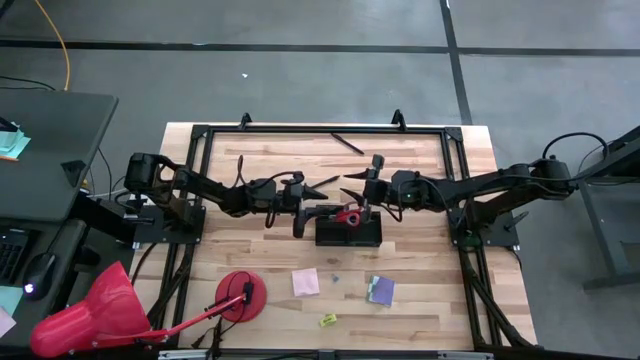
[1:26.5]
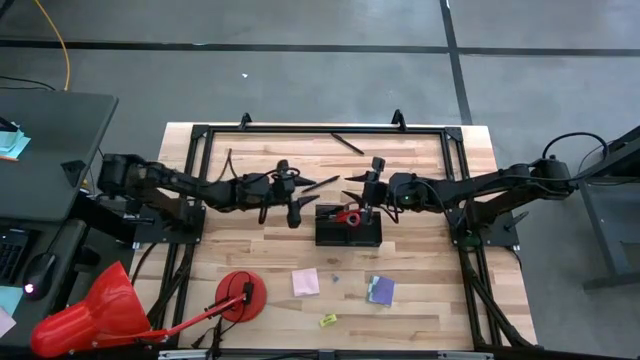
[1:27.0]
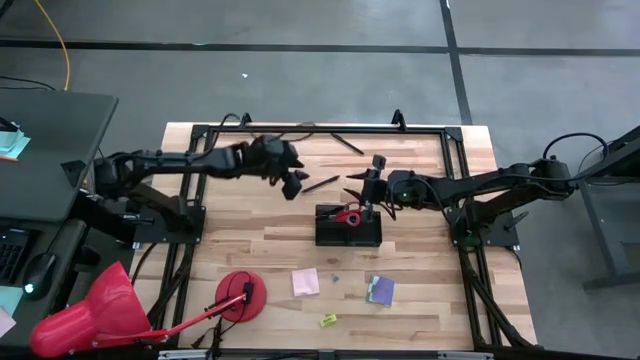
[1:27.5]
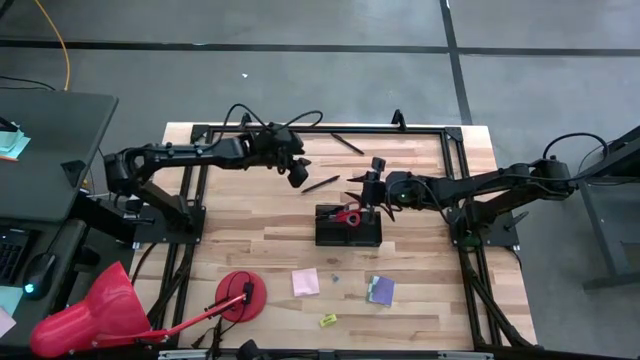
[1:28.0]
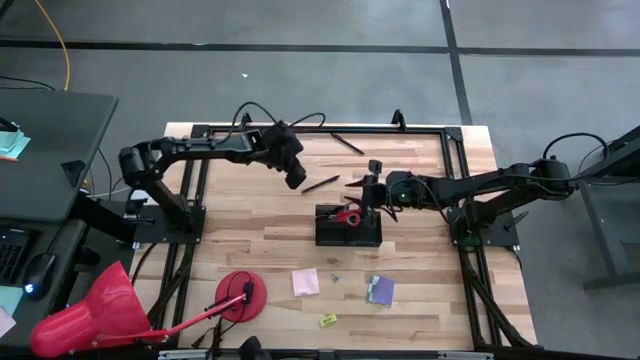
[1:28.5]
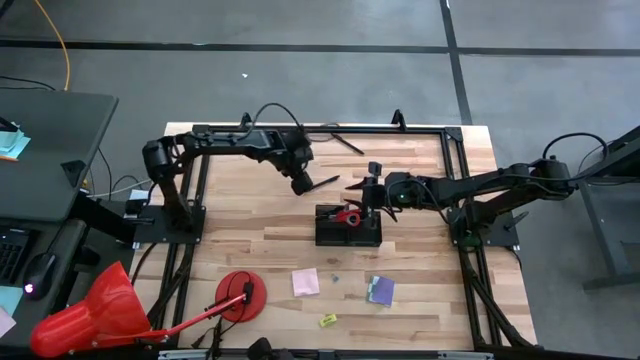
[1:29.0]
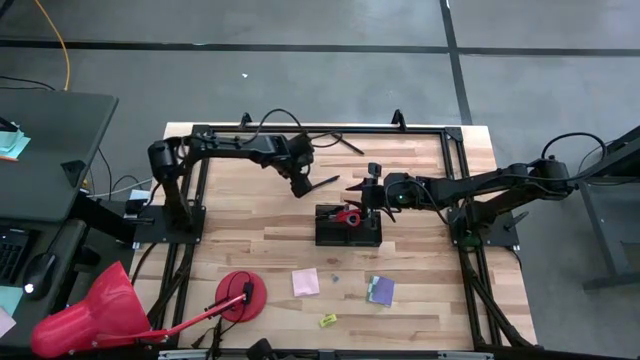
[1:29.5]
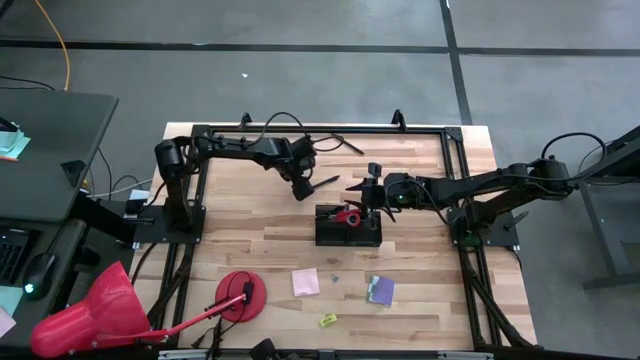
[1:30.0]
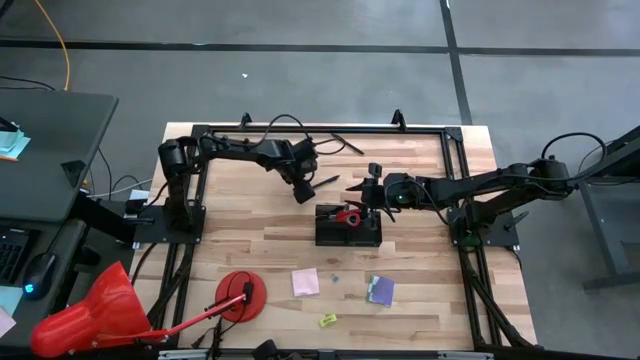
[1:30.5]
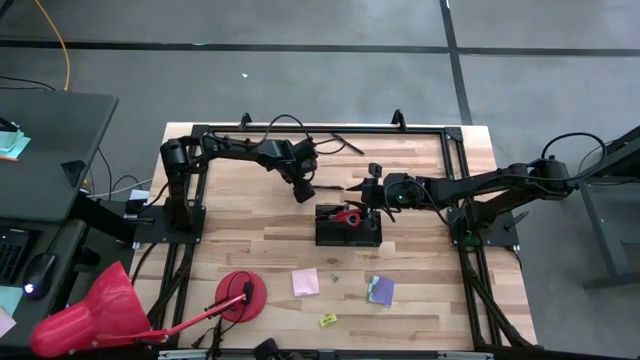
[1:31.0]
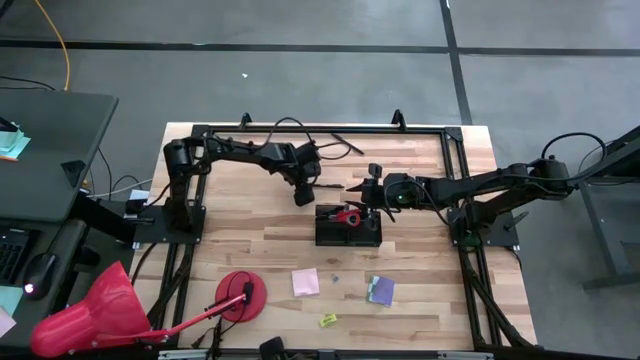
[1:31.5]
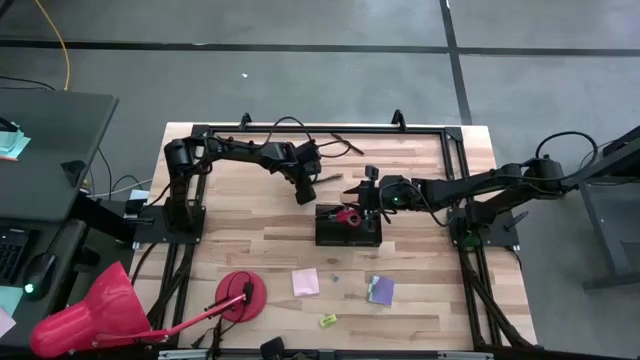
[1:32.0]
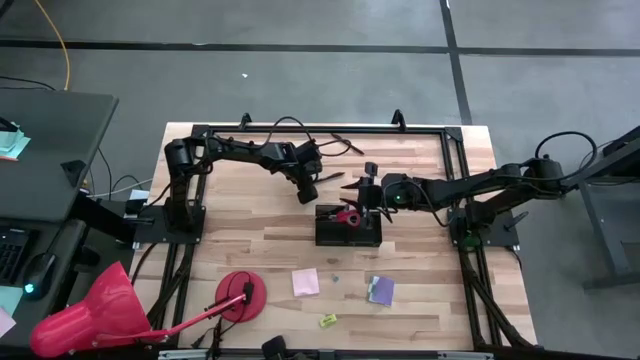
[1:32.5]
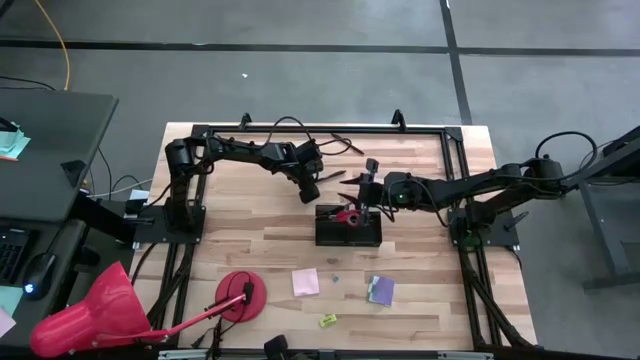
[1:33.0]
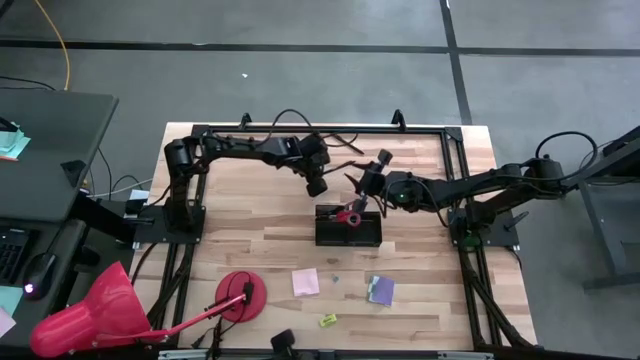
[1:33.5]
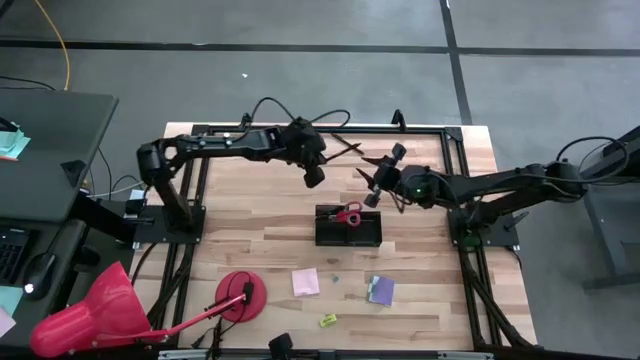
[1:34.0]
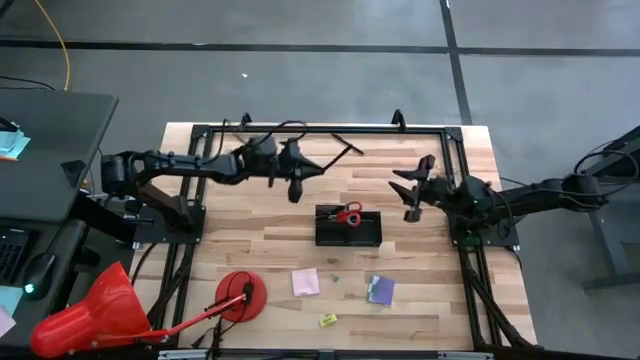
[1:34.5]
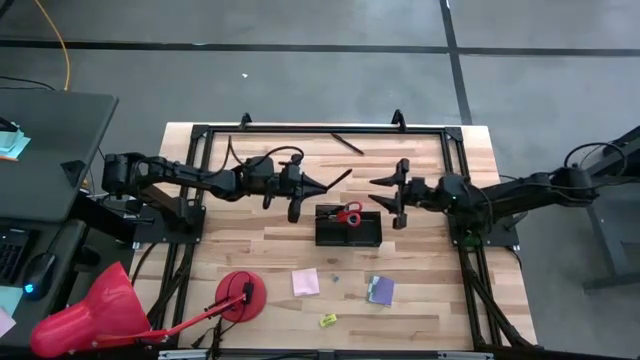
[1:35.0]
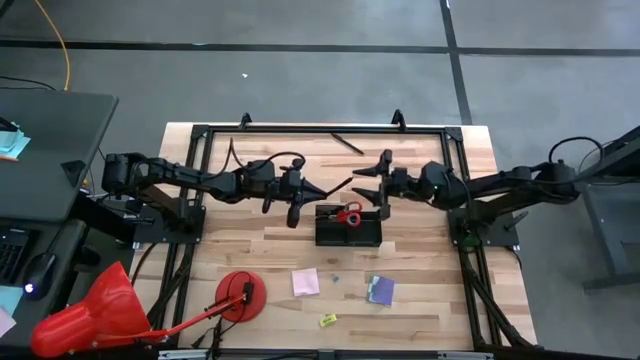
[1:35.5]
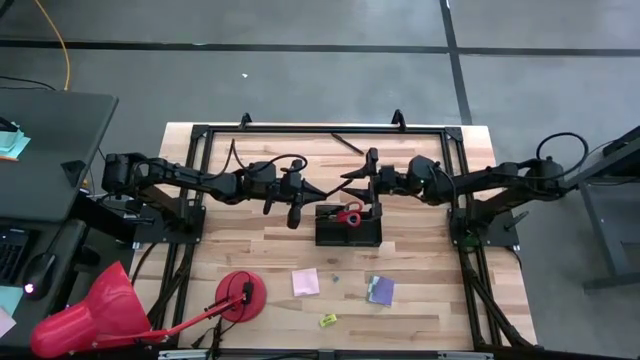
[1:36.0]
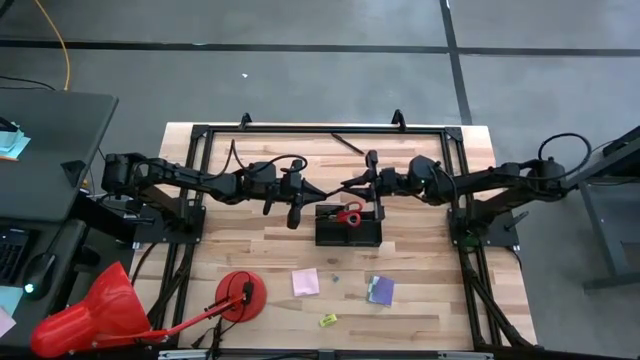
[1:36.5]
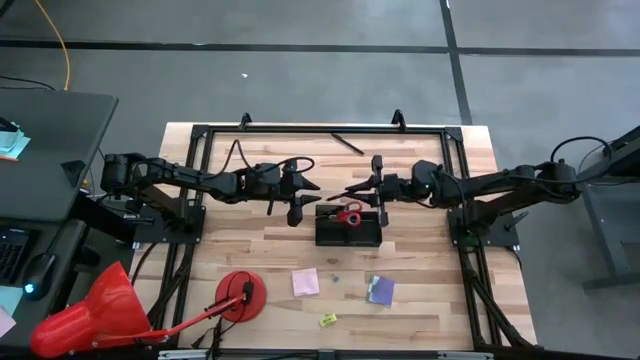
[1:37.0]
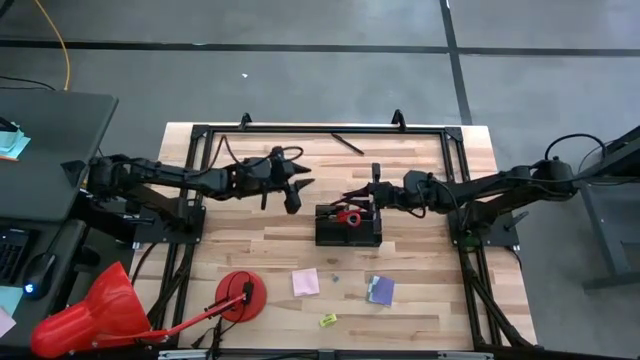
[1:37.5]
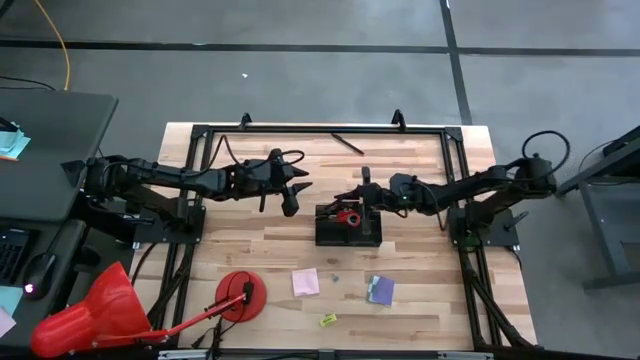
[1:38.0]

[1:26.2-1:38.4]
Task: Pick and place office supplies into organizer
Put the black pen into the black desk organizer

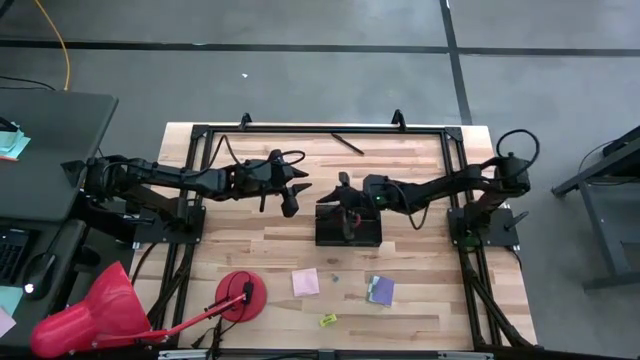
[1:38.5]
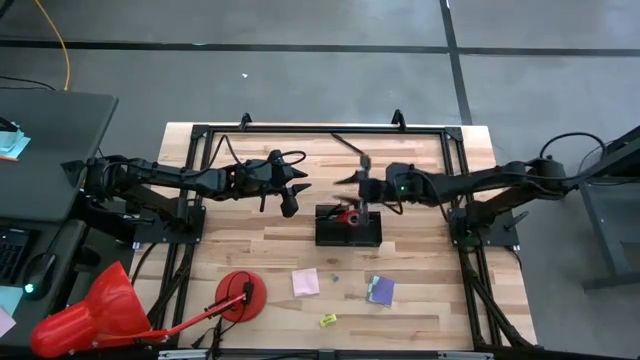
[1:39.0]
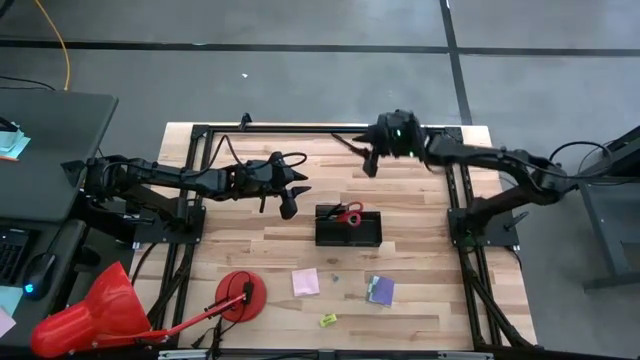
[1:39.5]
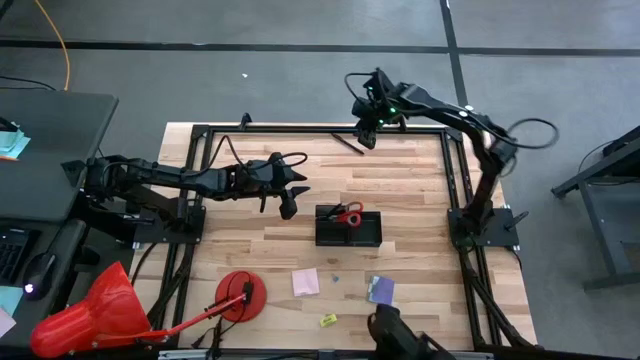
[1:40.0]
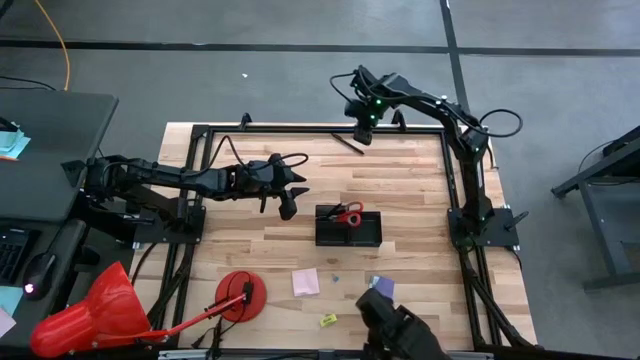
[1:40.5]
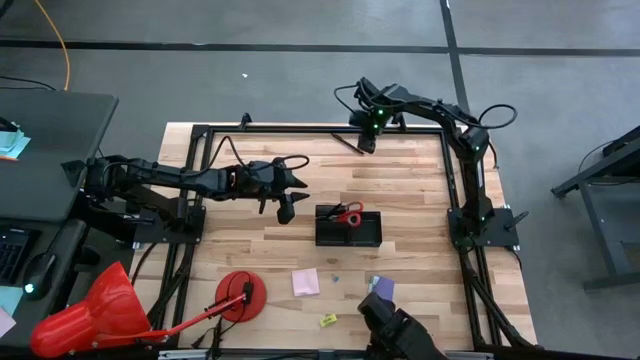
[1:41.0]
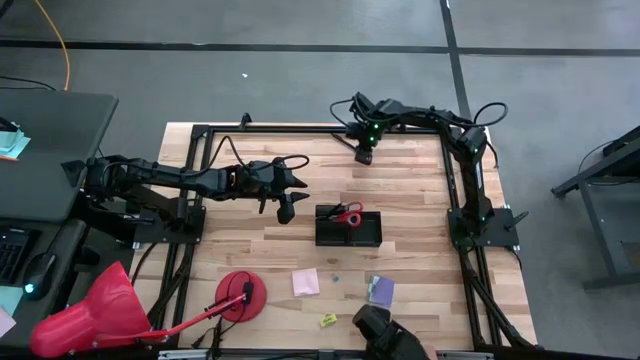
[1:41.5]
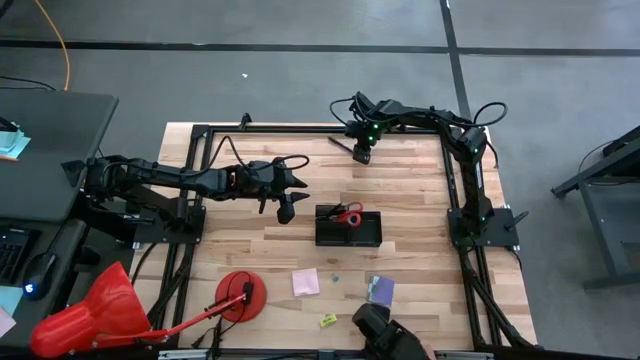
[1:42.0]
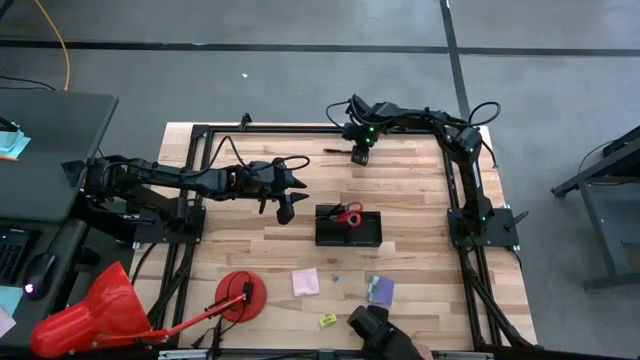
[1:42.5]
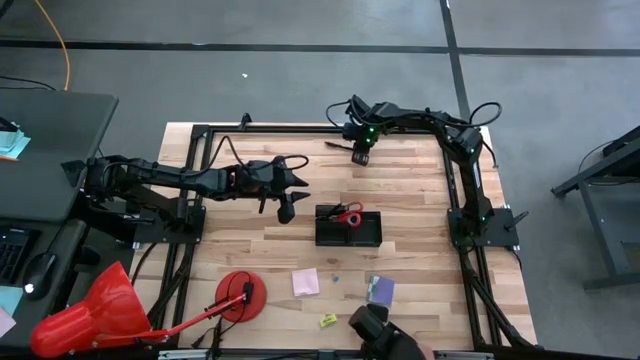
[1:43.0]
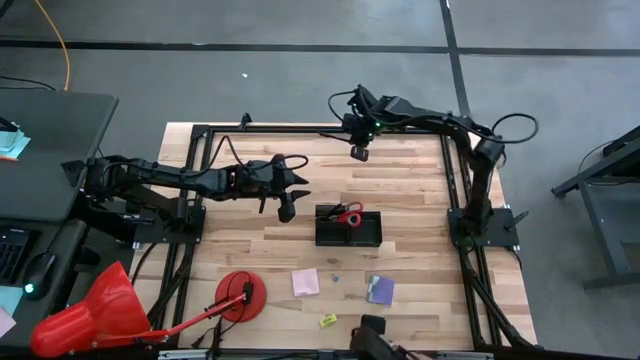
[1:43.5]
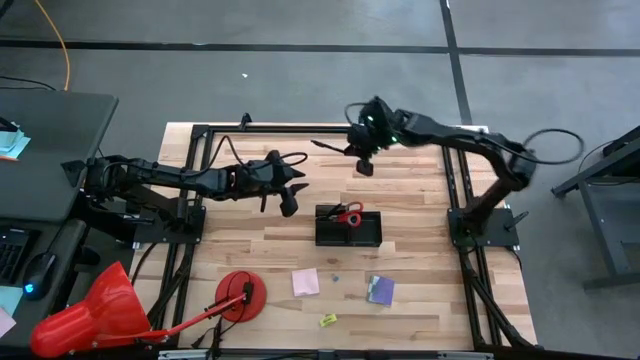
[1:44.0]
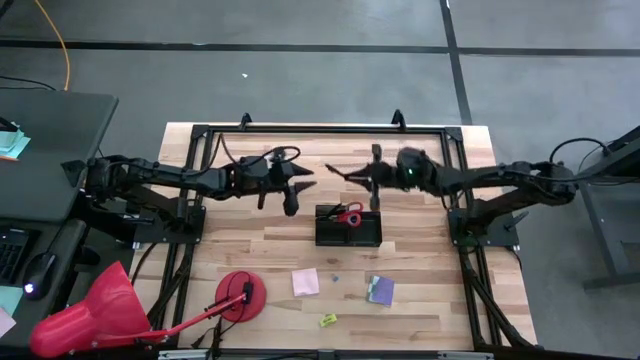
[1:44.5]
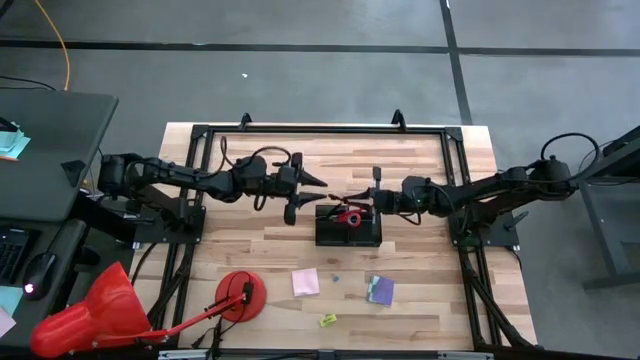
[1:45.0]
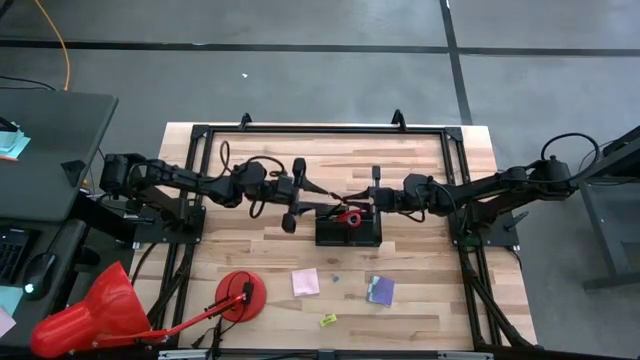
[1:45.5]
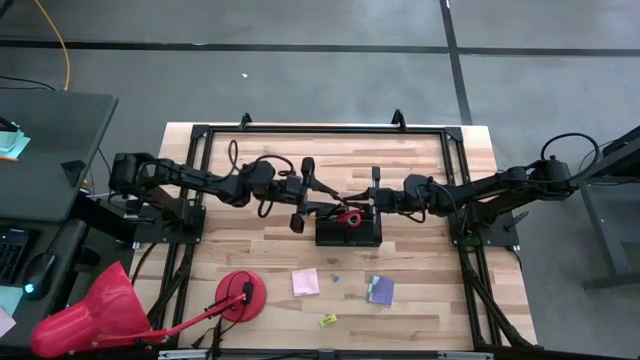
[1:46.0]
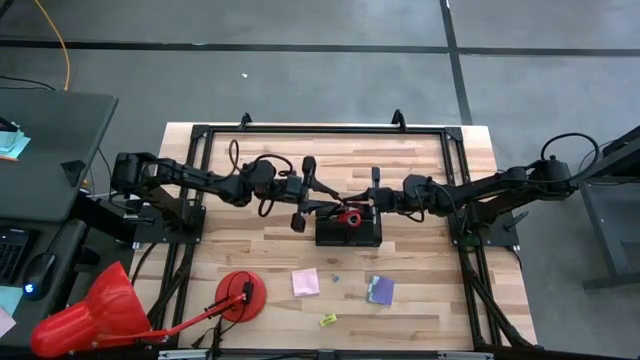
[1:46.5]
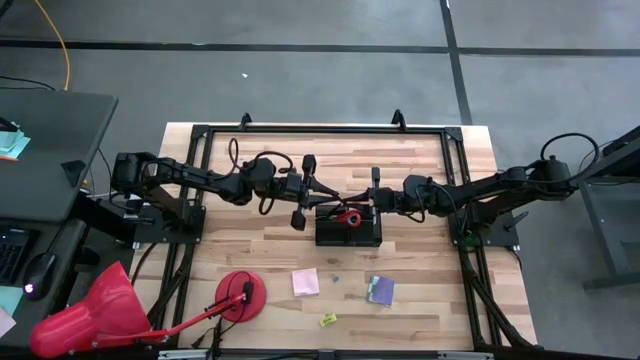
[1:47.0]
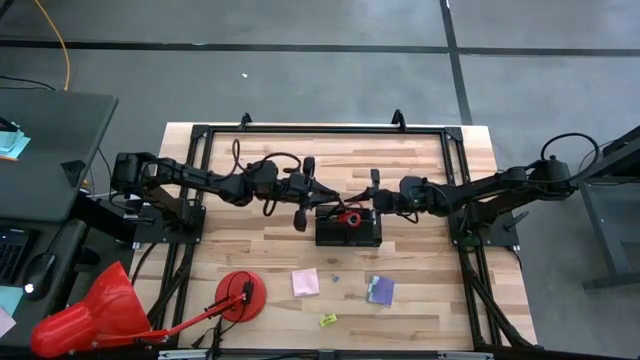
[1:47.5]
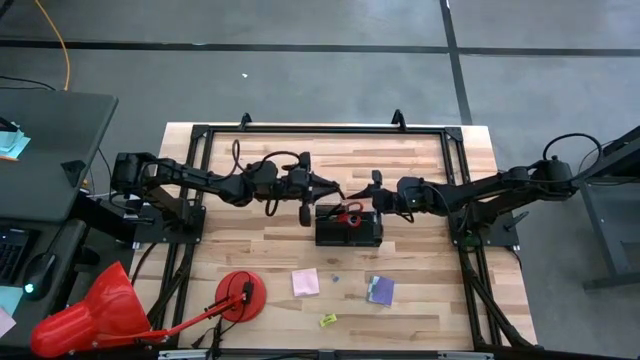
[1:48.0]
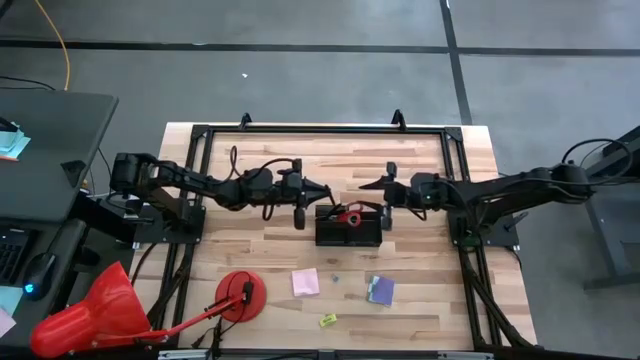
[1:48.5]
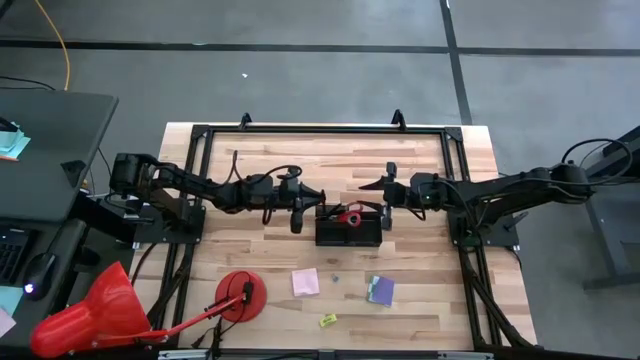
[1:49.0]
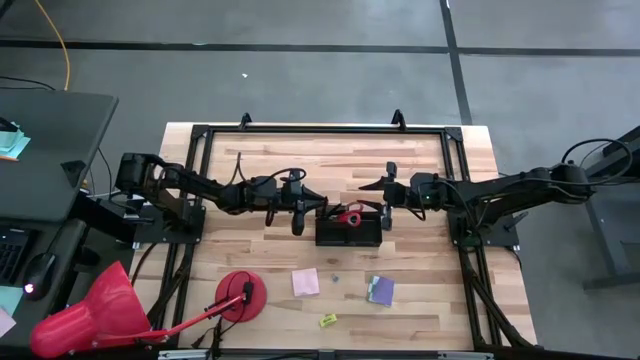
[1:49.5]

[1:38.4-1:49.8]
Put the black pen into the black desk organizer
